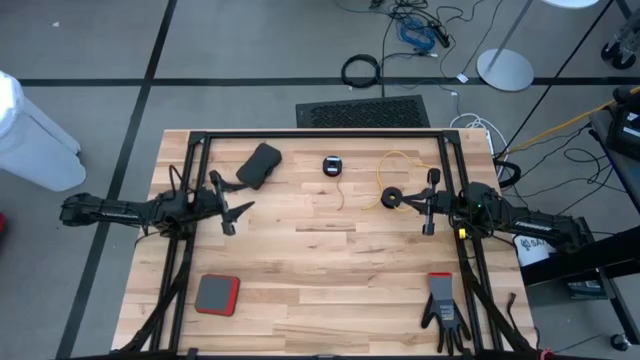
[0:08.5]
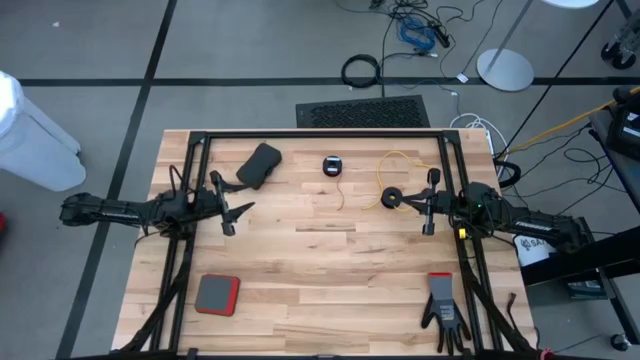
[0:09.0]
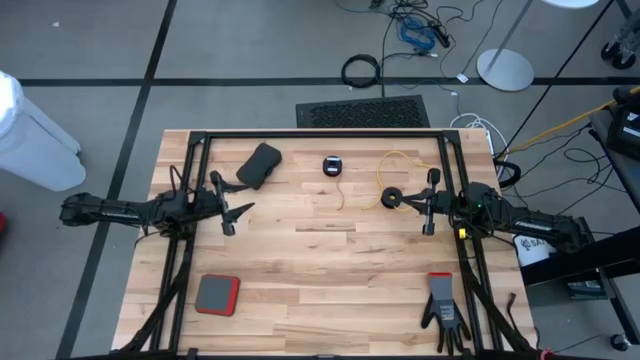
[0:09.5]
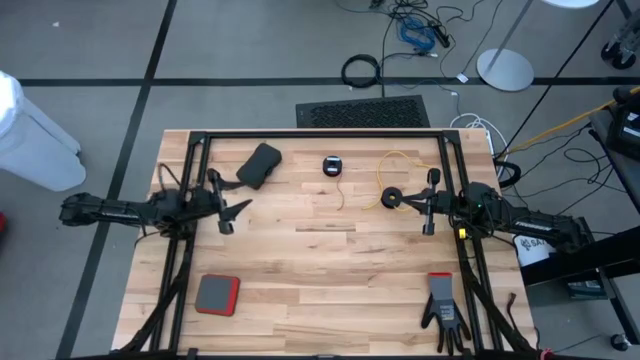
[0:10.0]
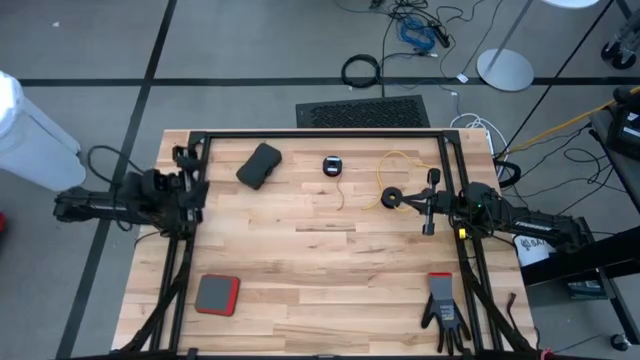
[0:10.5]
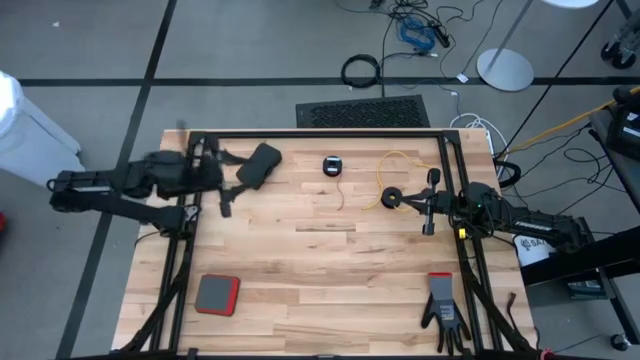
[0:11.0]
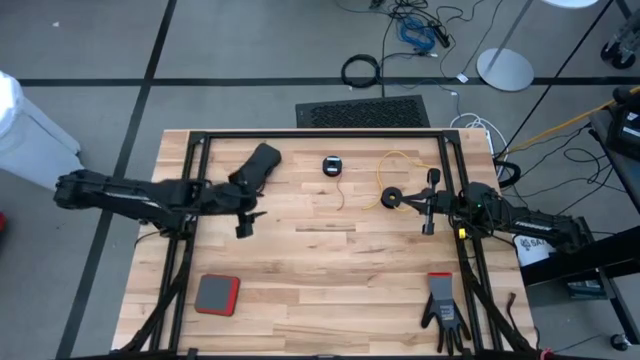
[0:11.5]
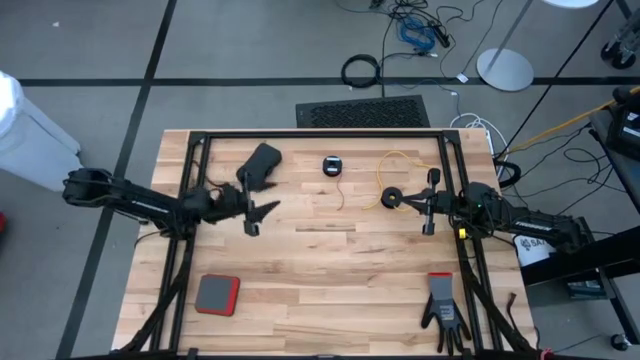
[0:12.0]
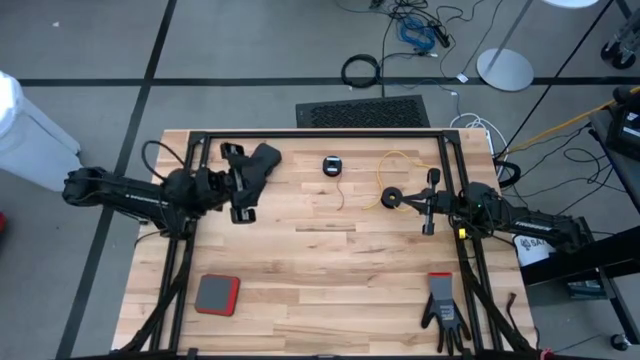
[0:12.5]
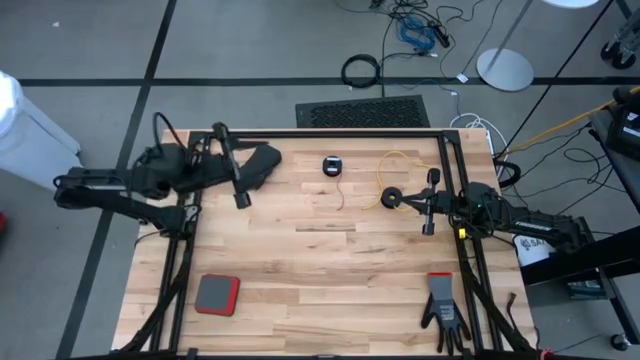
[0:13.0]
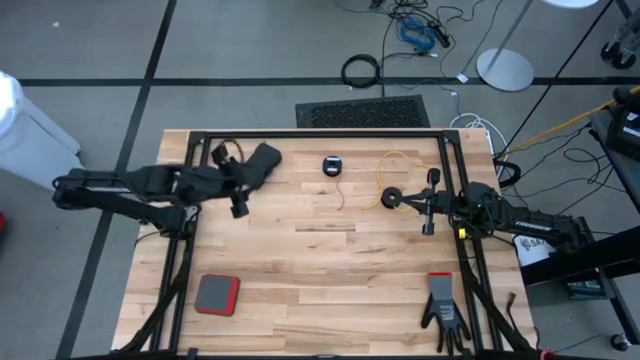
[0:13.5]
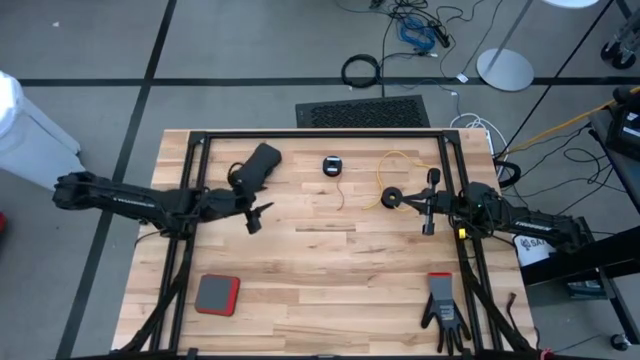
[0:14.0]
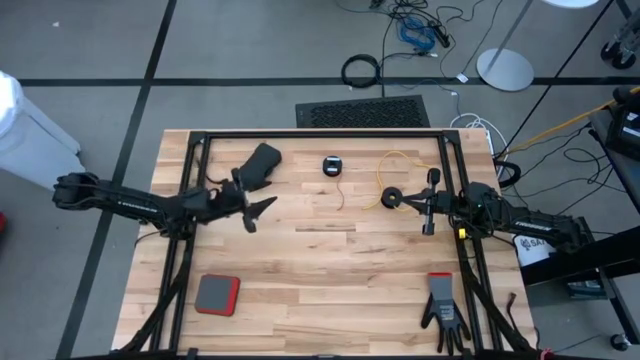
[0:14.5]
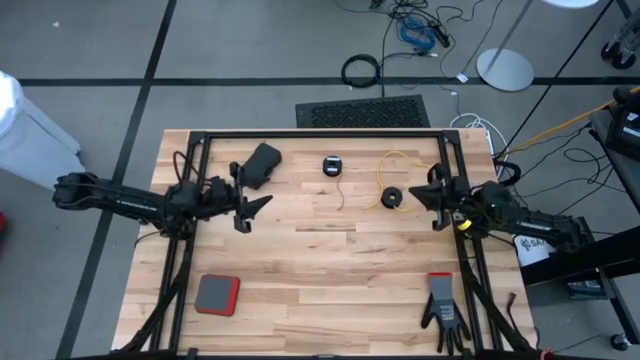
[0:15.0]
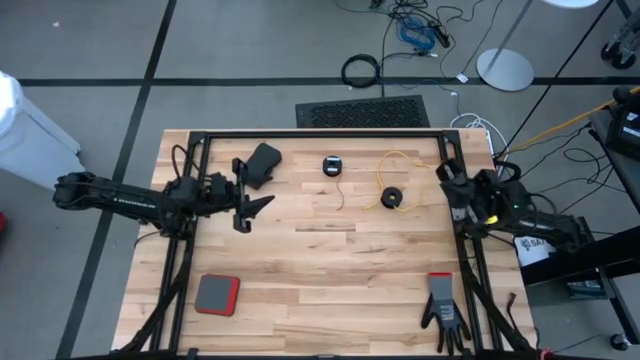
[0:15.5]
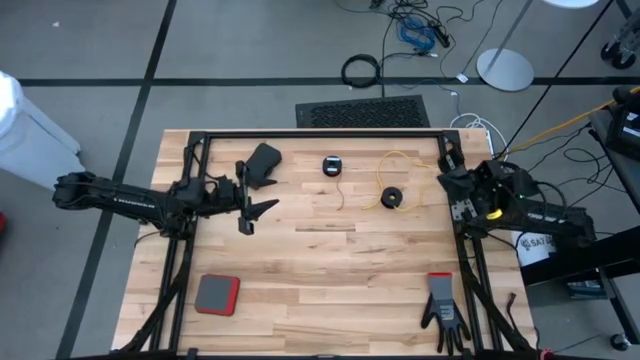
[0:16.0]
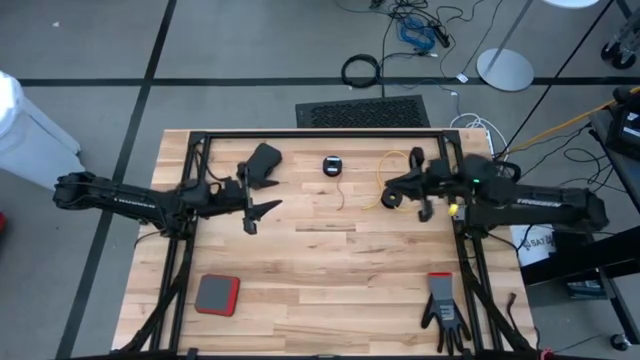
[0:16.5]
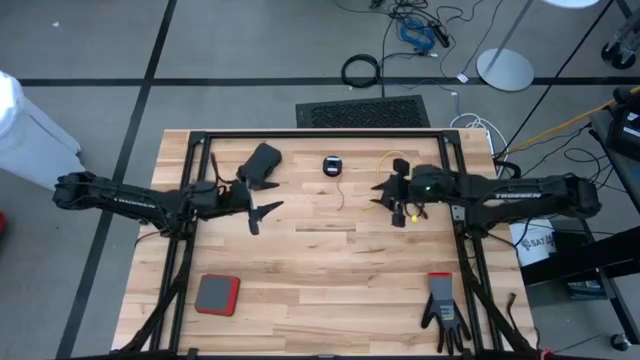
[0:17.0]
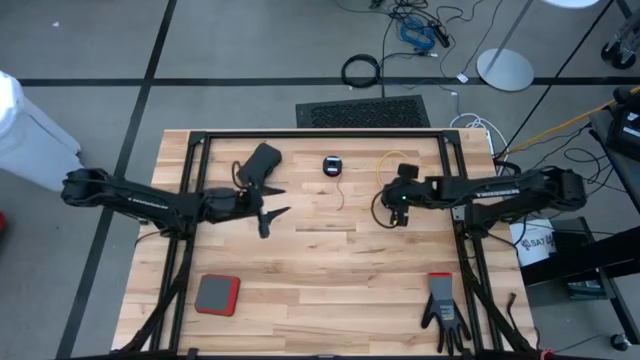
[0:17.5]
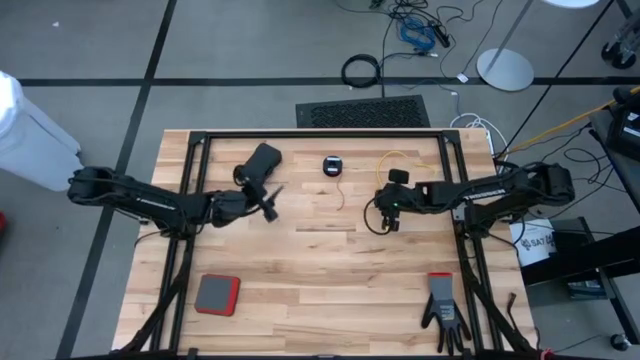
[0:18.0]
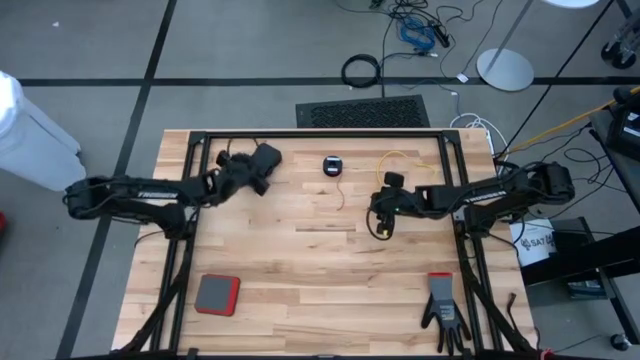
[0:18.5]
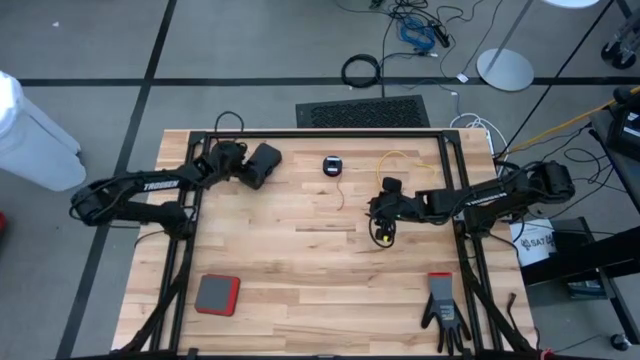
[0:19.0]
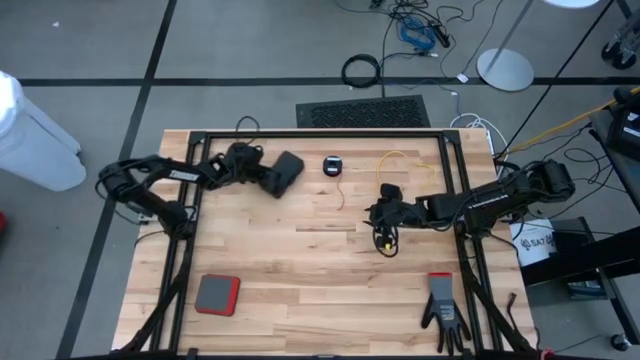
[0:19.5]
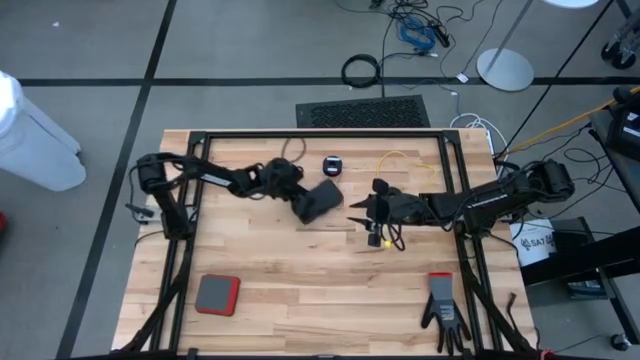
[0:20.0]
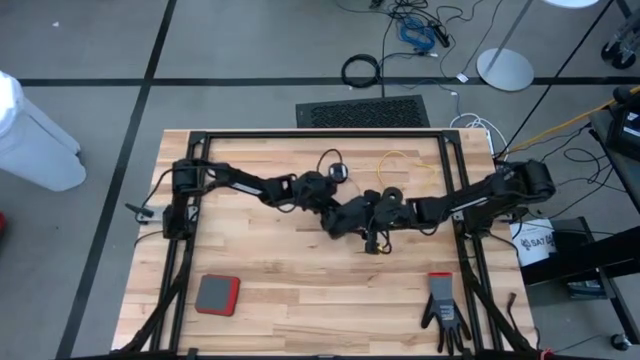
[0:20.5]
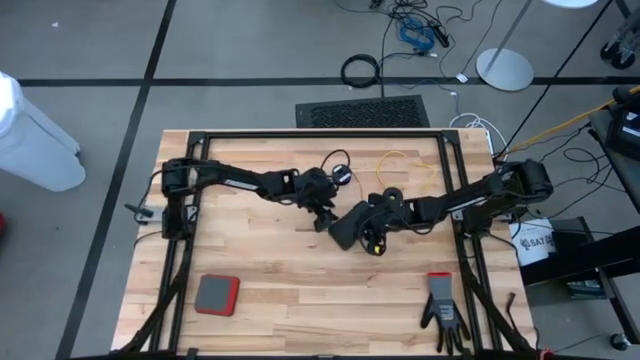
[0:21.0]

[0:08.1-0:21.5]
Task: Coil cords
Move the black case to the middle right

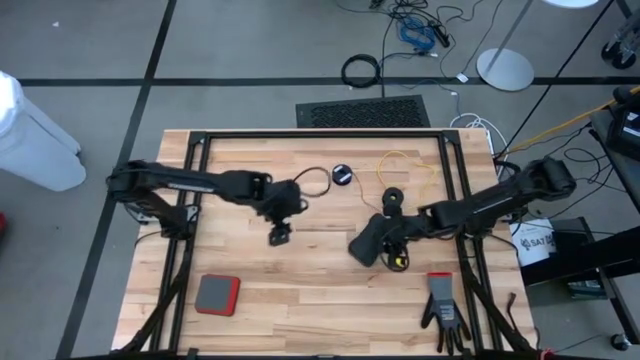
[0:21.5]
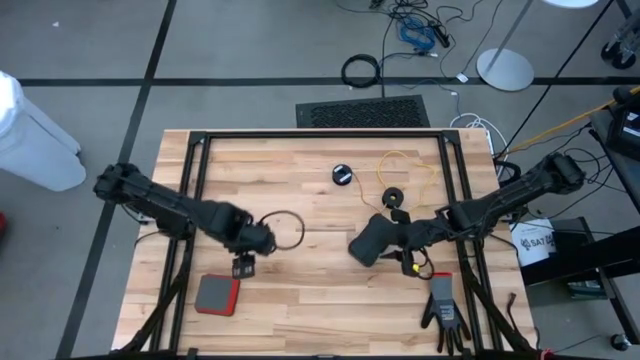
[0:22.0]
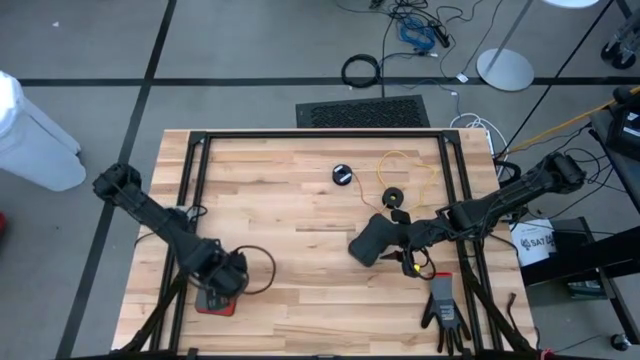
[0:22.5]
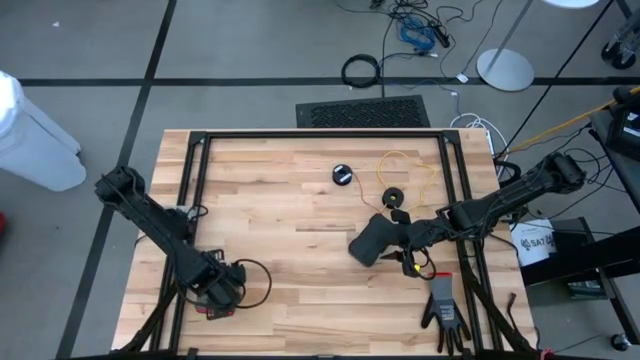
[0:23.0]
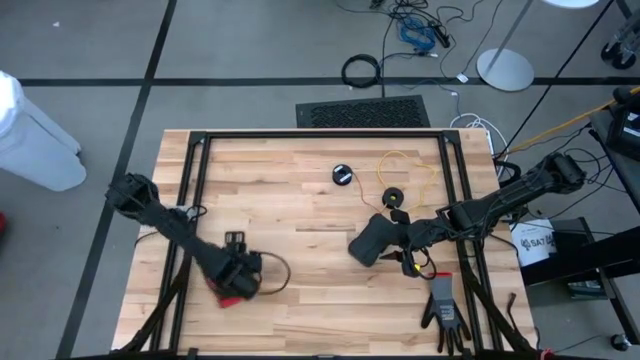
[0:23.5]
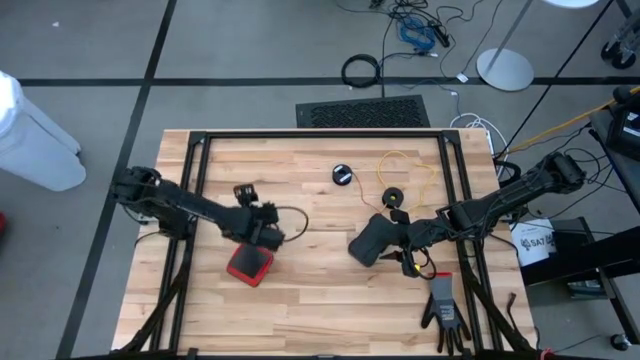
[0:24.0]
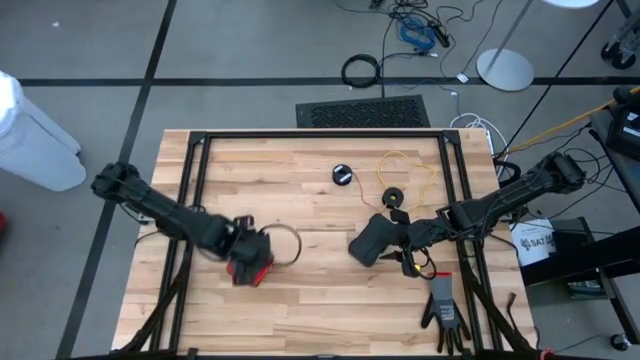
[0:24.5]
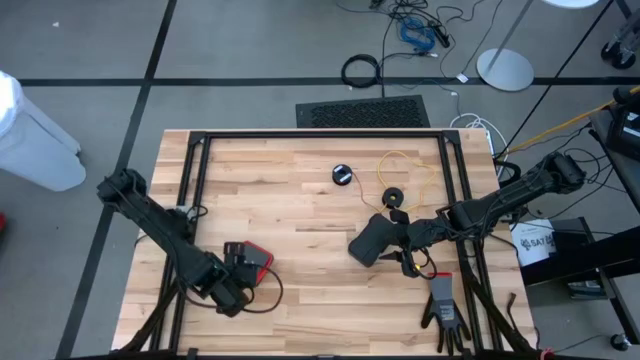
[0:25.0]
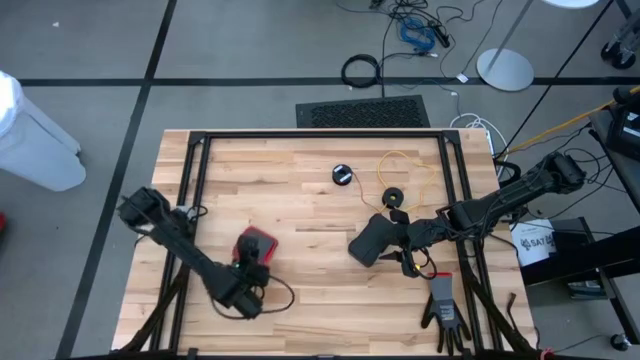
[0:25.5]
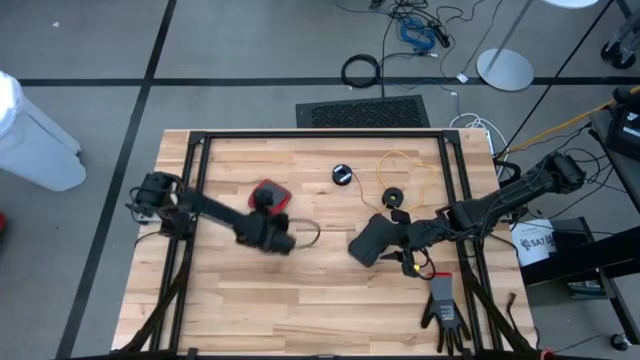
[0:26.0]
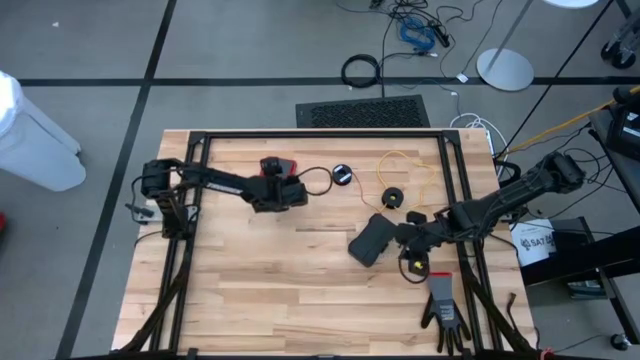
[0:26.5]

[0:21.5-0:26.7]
Move the black-red case to the top left

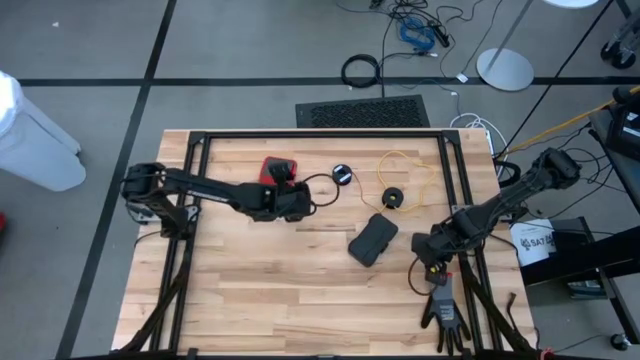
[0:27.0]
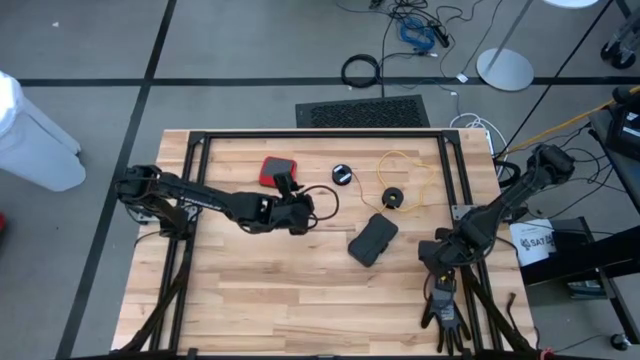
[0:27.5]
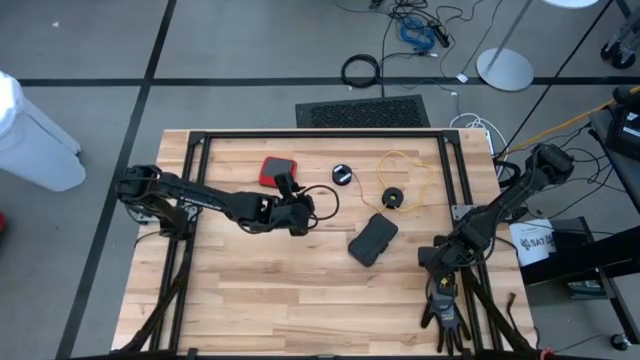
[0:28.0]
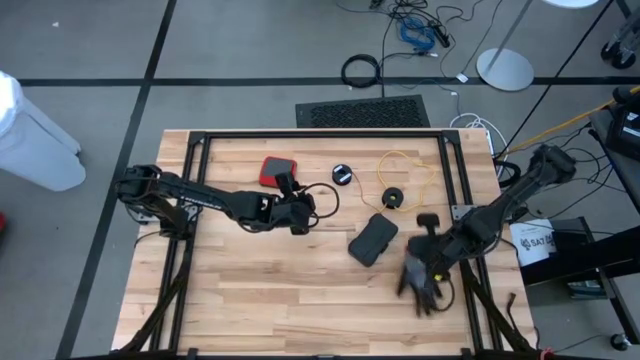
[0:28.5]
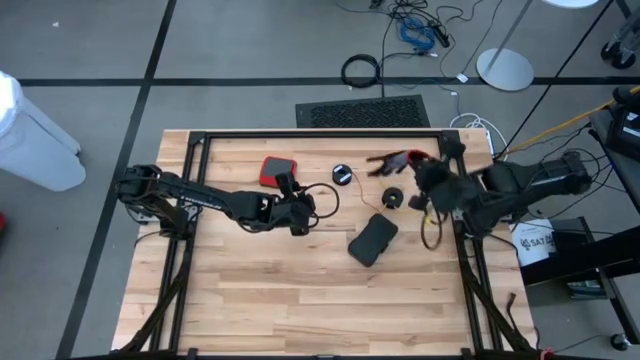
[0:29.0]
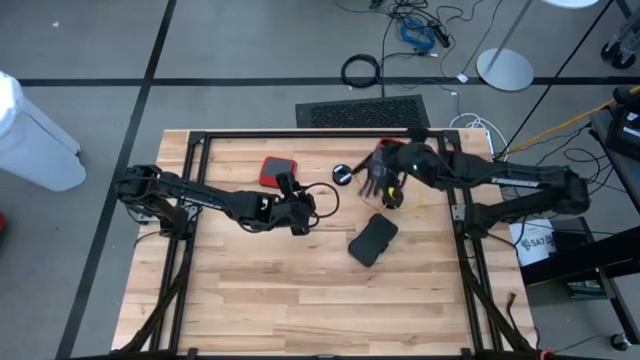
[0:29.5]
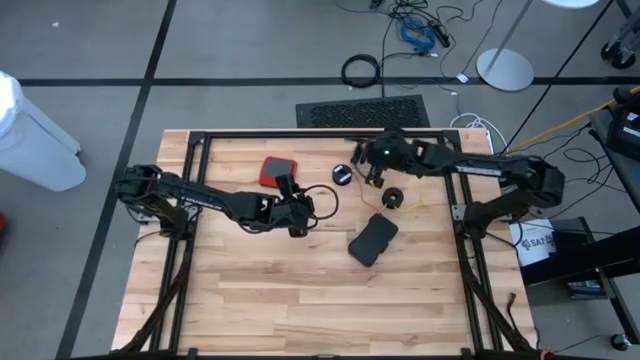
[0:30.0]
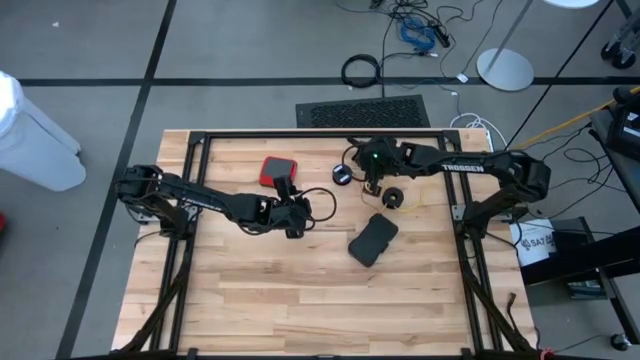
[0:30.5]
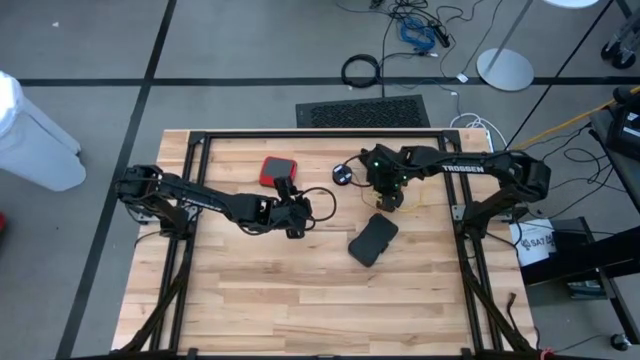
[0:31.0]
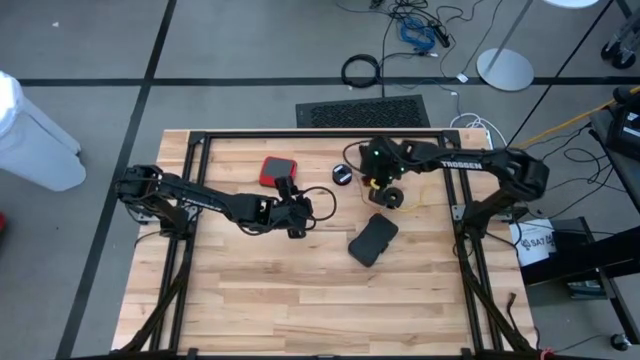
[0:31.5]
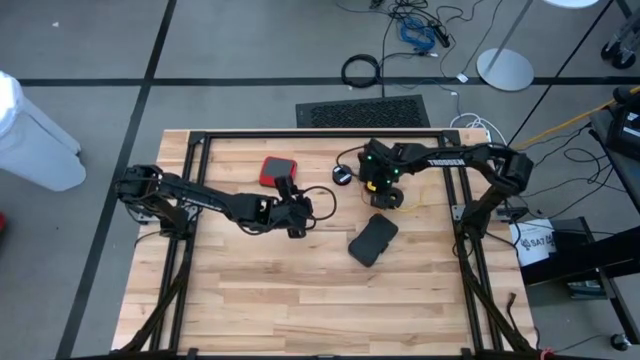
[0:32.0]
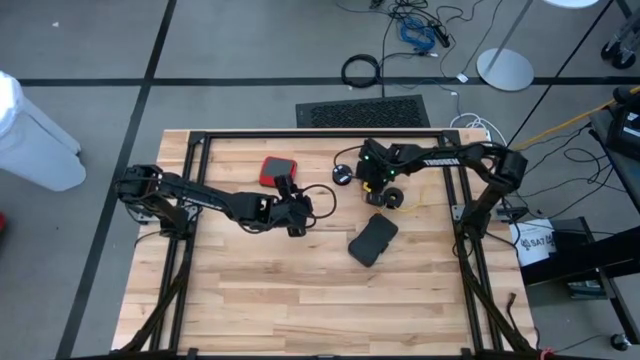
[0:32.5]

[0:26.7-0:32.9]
Move the gray gloves to the top right
